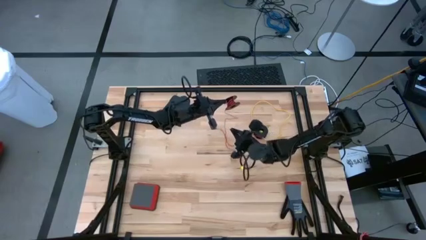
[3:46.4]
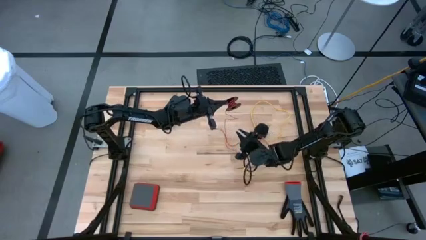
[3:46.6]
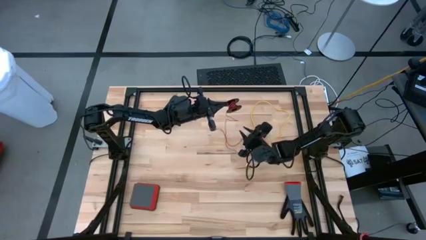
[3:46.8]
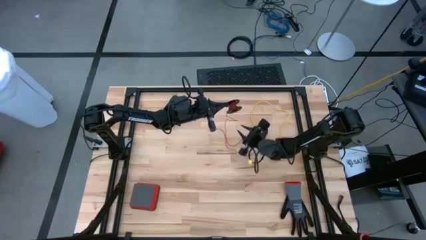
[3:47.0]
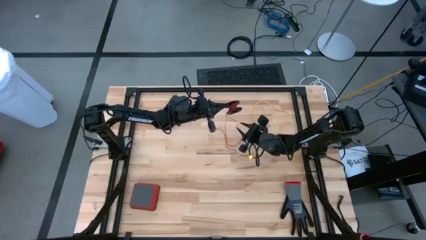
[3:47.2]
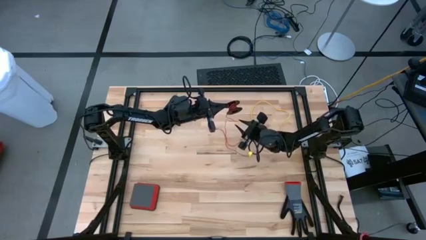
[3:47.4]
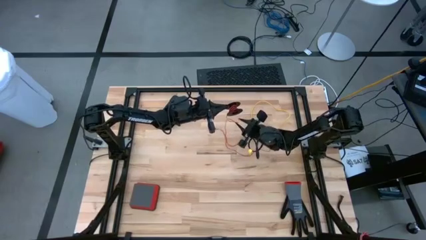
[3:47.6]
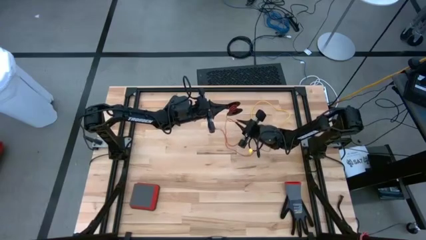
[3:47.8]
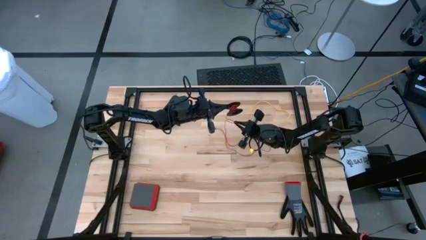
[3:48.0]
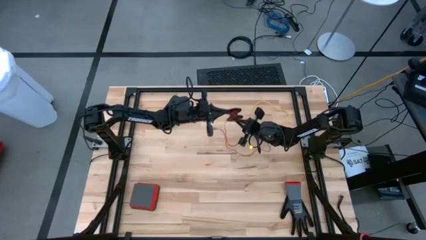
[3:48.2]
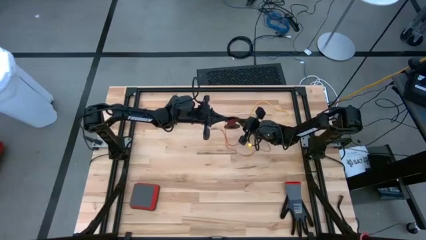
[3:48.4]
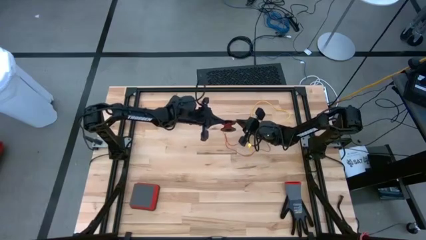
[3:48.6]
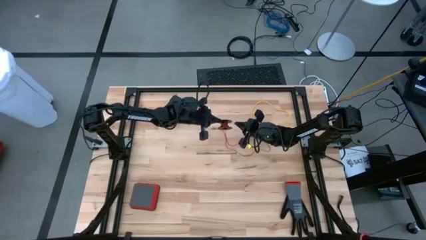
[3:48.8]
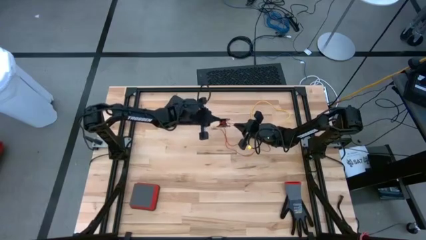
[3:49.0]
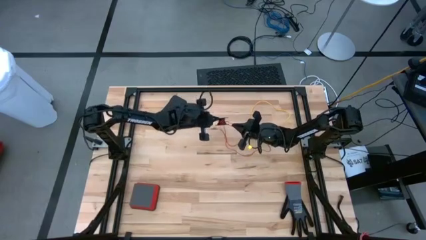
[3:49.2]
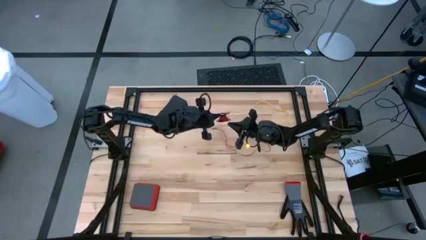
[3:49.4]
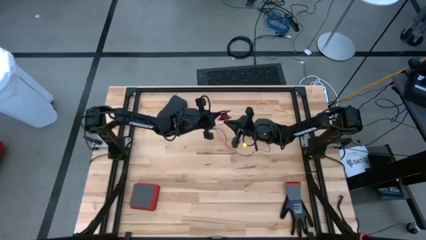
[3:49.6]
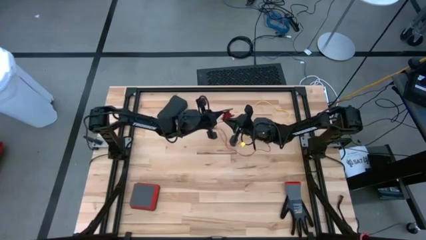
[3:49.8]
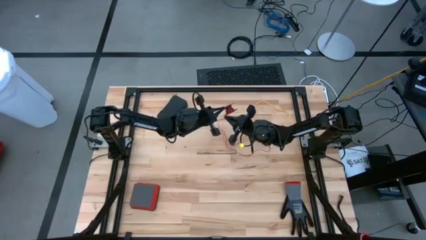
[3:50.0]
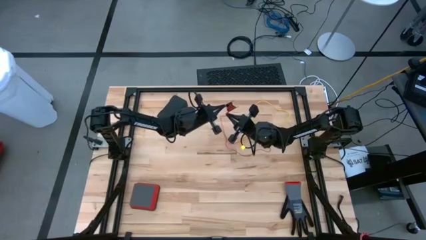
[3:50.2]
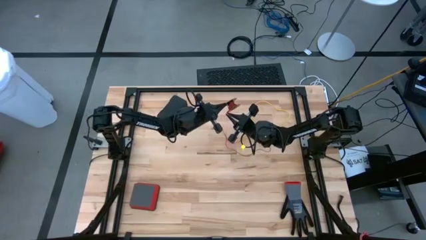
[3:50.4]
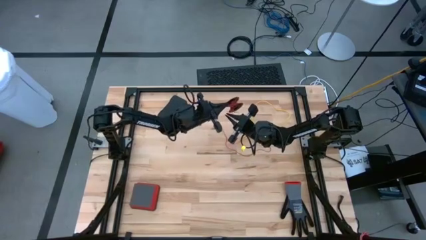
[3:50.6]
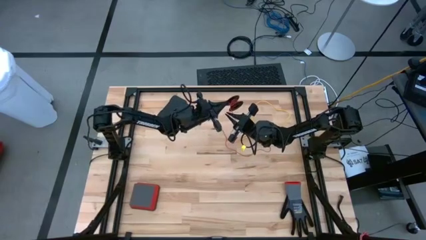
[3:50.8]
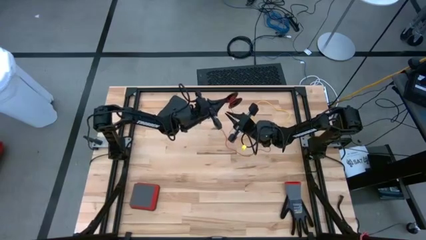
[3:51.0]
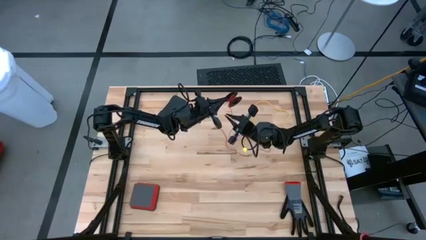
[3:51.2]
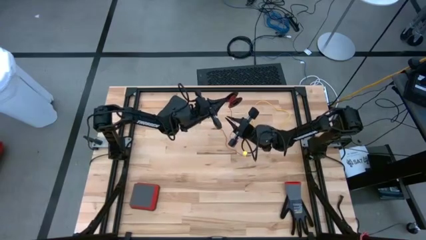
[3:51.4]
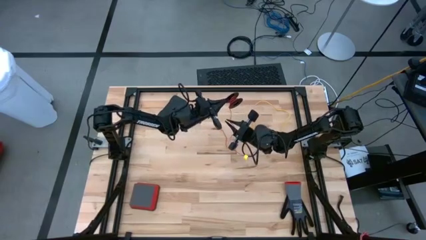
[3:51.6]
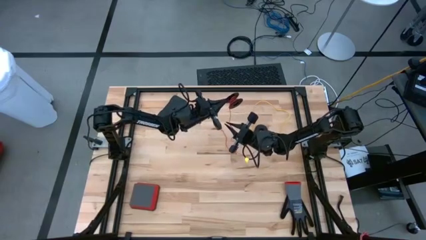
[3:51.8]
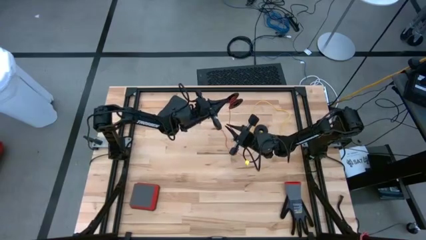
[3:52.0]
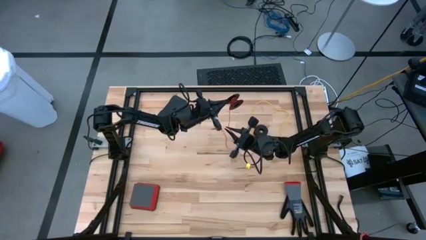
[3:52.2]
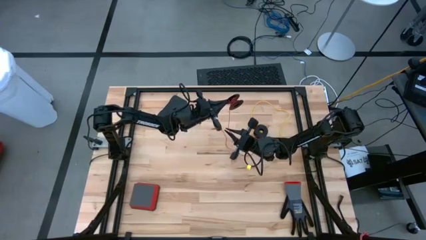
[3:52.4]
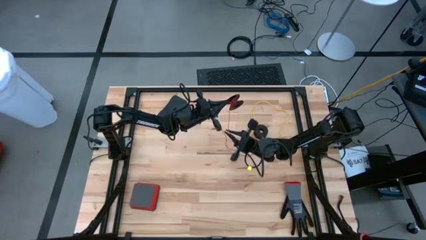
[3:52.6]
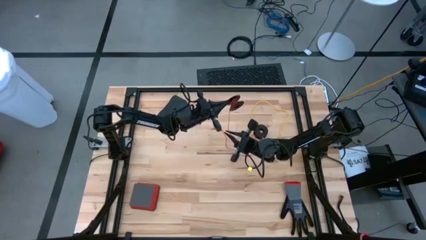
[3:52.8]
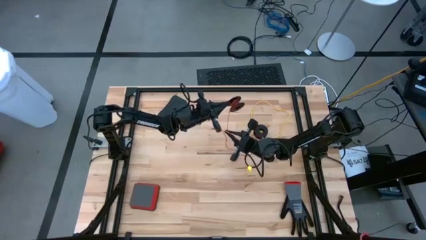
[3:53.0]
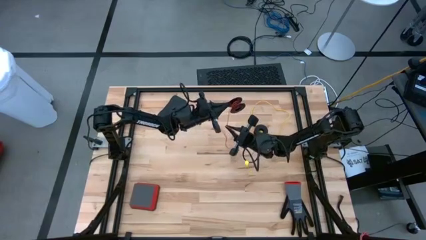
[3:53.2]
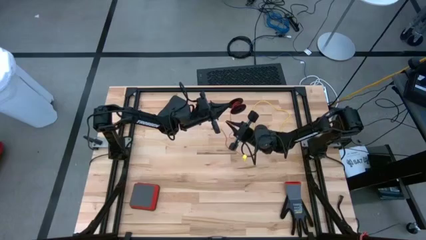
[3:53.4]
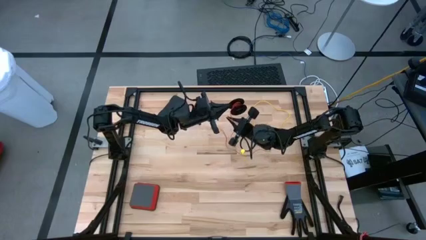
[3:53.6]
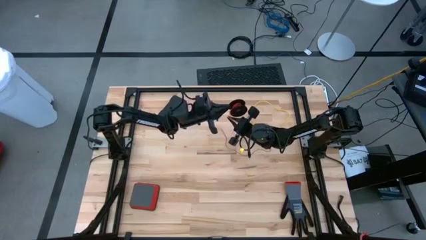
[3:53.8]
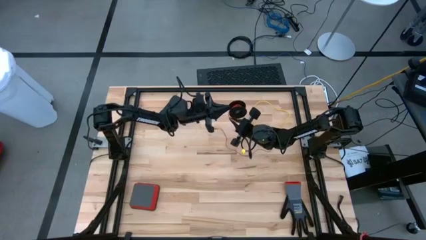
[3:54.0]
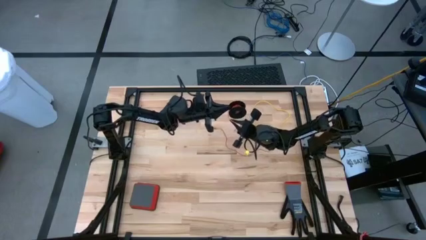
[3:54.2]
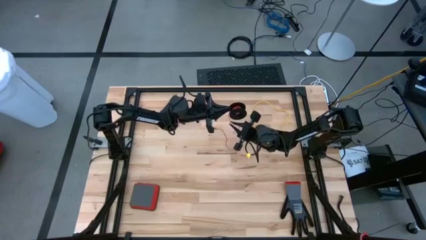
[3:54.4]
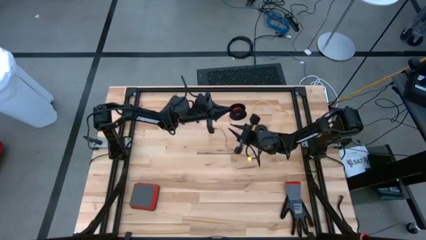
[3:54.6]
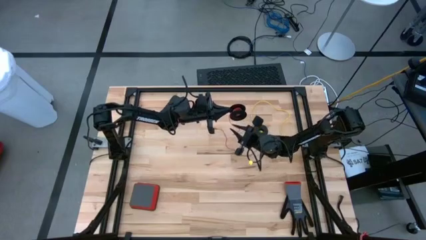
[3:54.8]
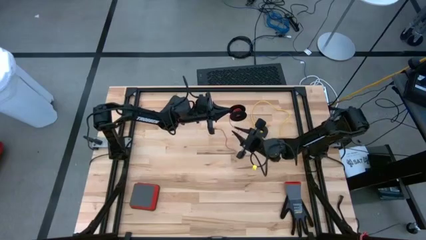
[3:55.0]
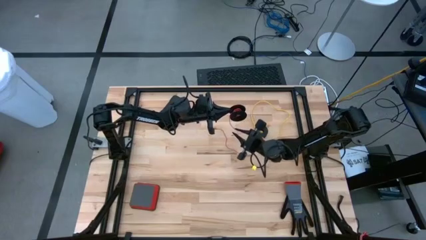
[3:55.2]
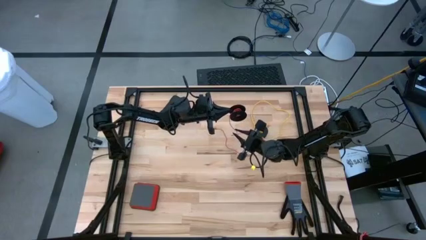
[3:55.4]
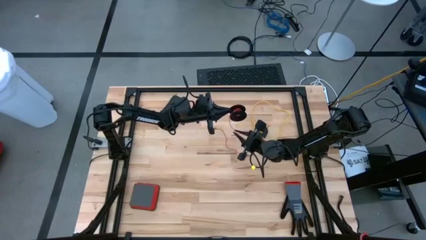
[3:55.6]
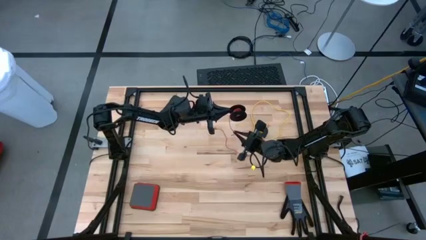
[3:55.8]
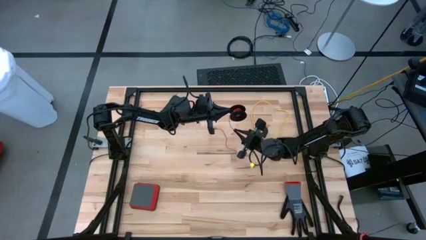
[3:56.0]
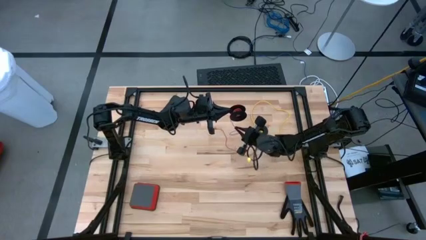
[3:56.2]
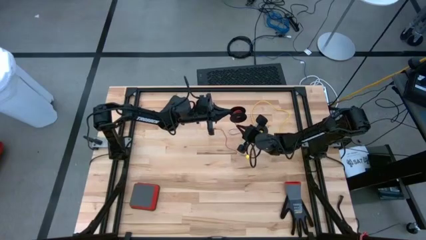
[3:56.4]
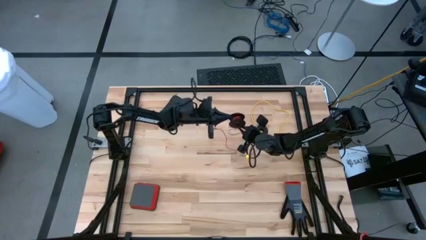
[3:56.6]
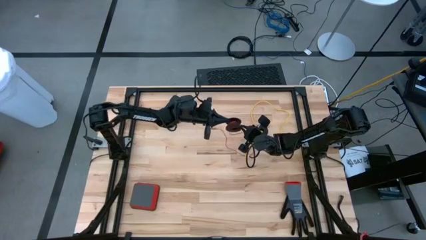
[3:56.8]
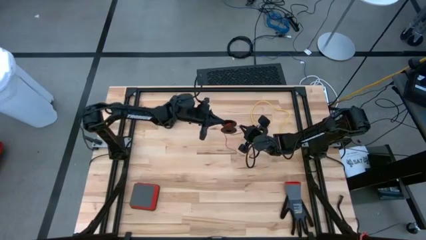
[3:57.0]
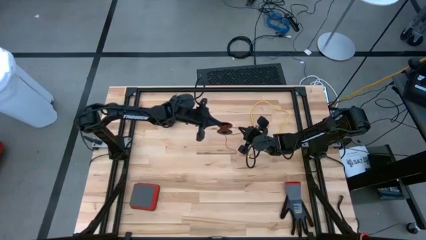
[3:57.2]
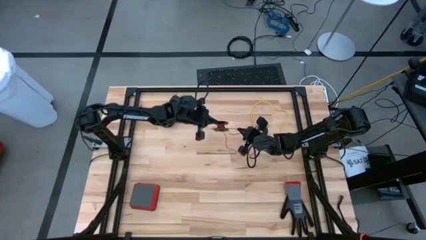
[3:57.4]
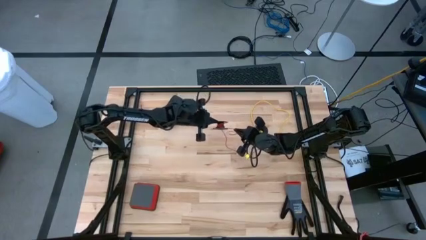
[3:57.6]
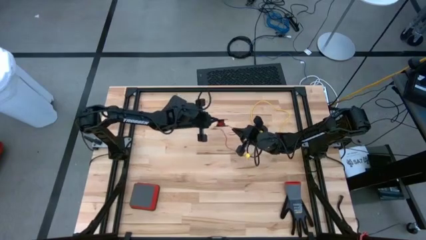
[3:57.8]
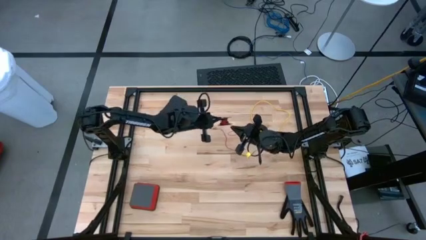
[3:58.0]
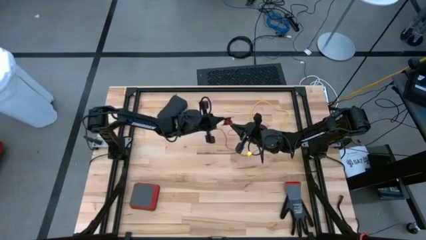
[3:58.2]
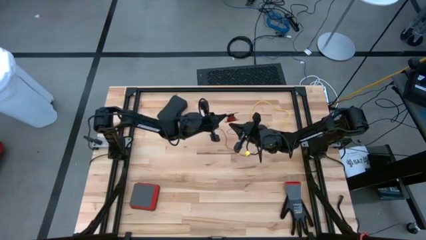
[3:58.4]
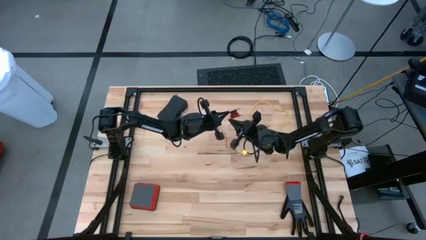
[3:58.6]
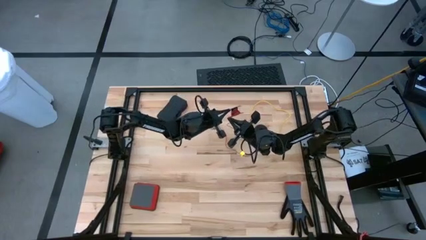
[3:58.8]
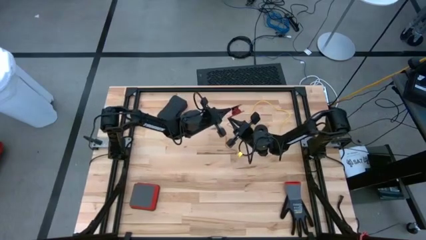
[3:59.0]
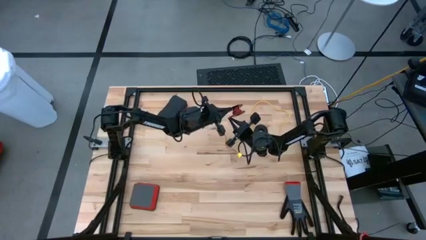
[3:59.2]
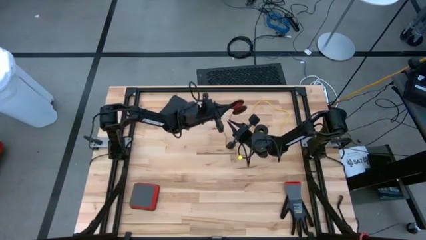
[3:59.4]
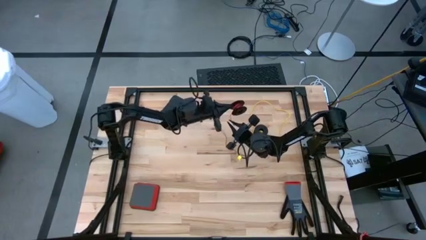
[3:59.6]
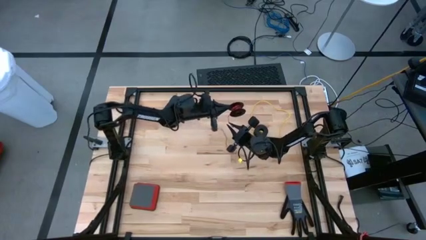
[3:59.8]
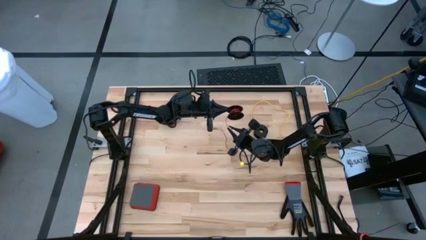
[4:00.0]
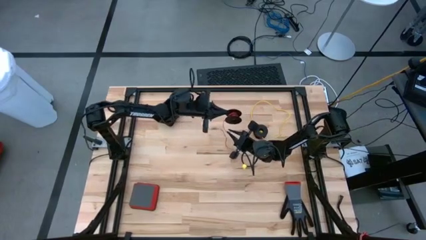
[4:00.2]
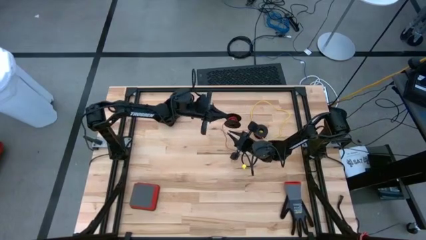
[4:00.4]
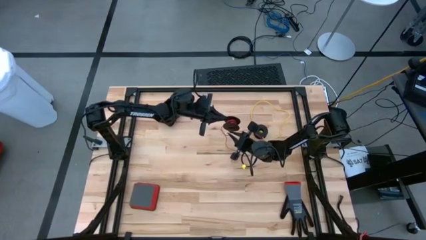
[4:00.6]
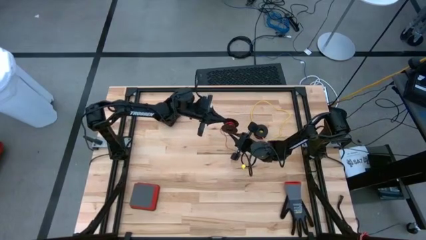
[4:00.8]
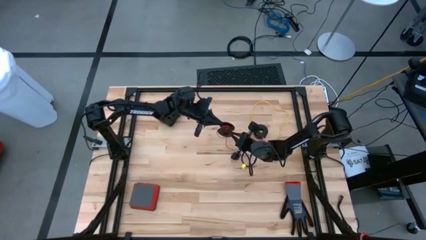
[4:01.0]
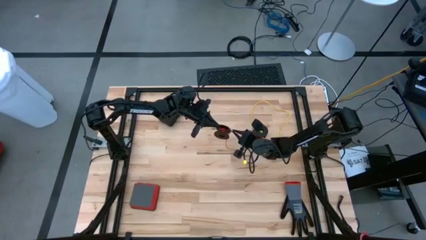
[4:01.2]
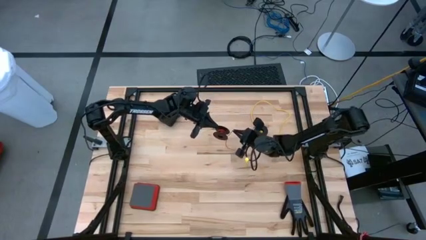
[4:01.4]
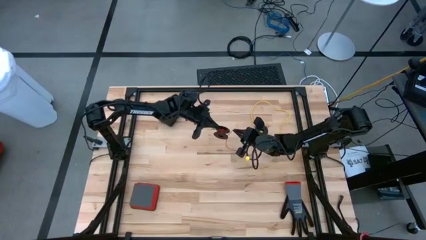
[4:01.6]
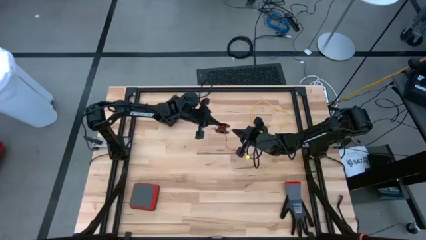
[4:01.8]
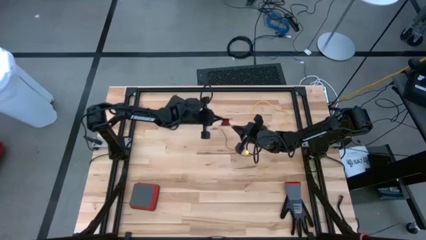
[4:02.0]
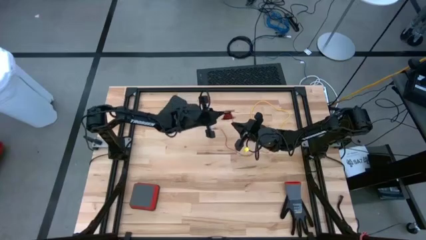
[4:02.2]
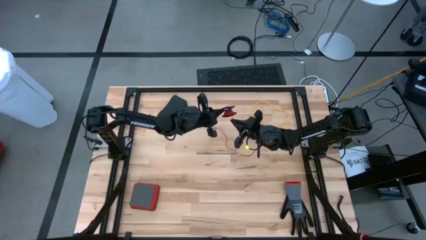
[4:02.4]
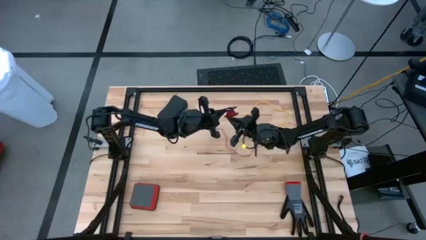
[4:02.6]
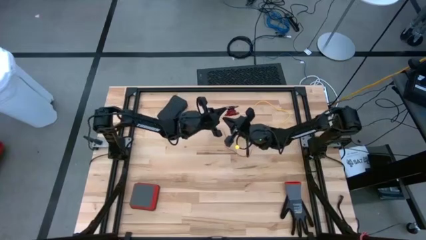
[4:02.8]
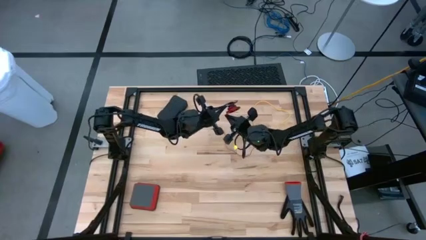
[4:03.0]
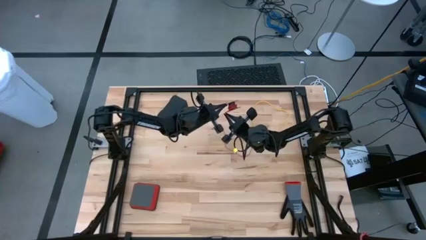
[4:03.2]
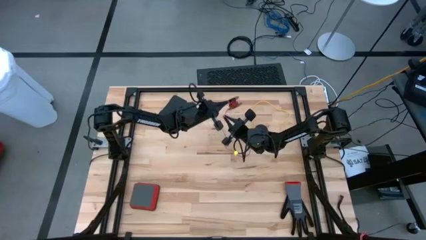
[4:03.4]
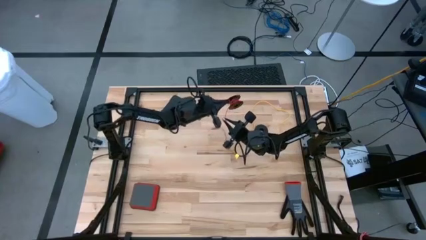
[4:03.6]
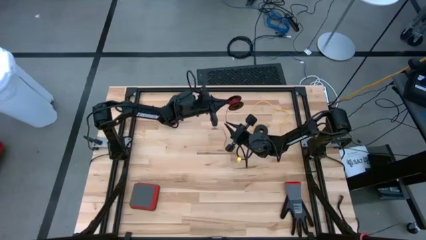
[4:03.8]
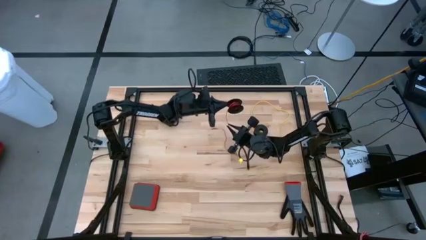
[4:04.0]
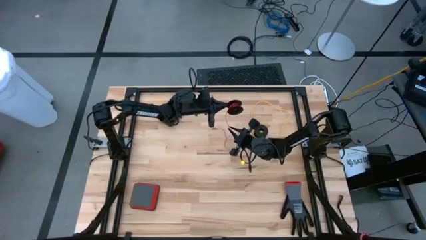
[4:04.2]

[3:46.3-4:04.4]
Task: Coil cords
Coil the red wire onto the black spool
